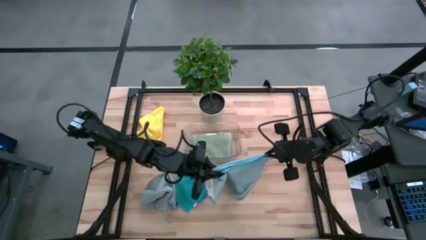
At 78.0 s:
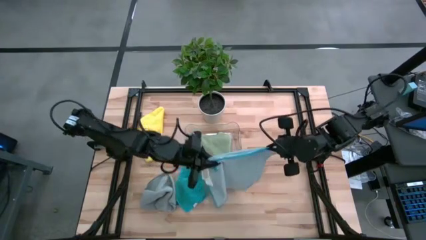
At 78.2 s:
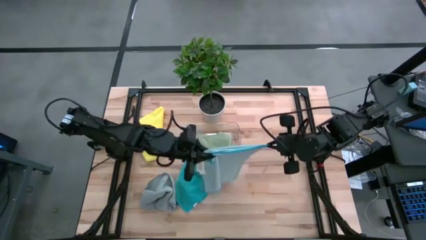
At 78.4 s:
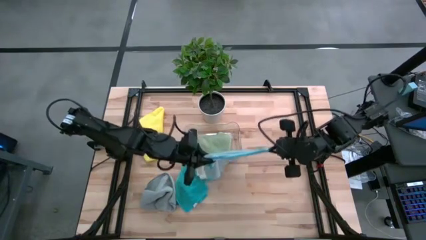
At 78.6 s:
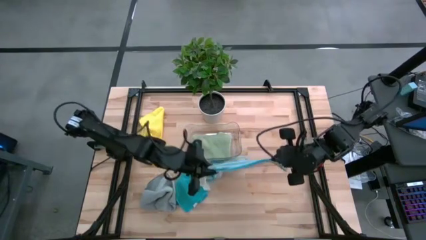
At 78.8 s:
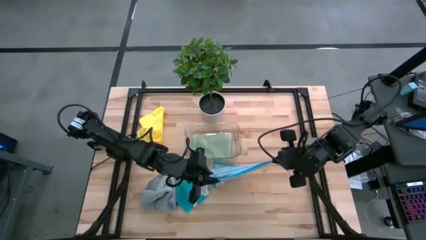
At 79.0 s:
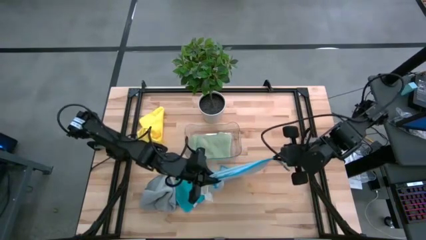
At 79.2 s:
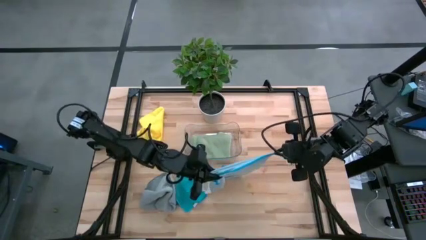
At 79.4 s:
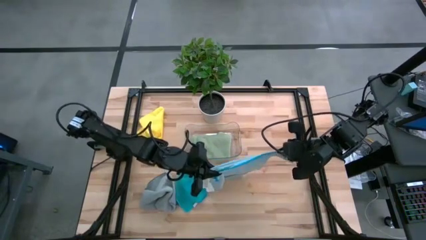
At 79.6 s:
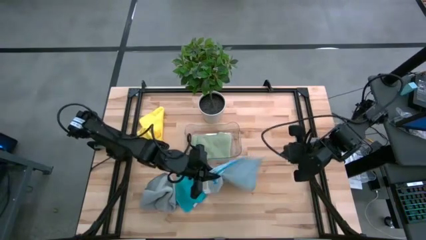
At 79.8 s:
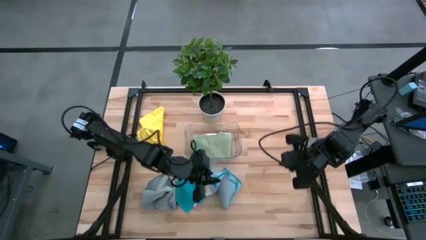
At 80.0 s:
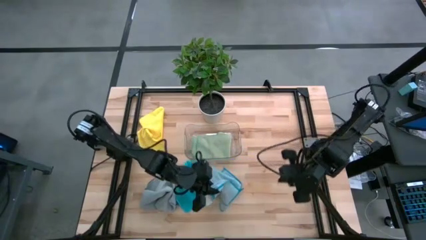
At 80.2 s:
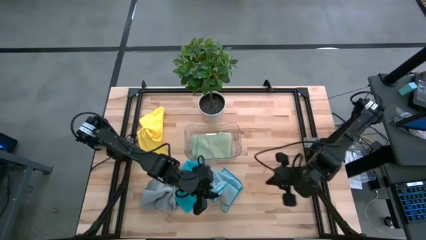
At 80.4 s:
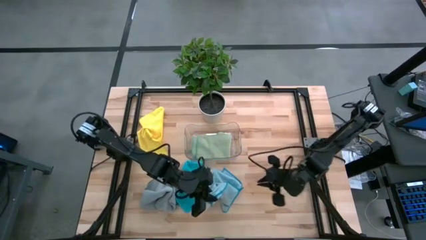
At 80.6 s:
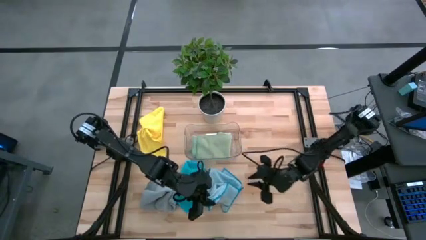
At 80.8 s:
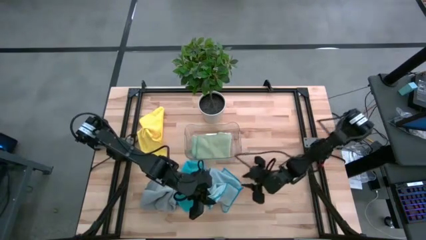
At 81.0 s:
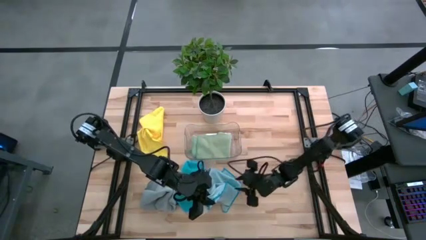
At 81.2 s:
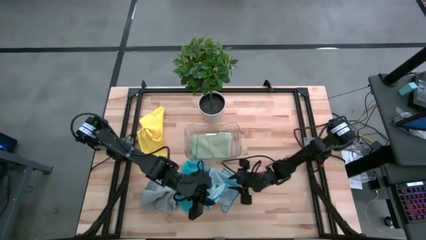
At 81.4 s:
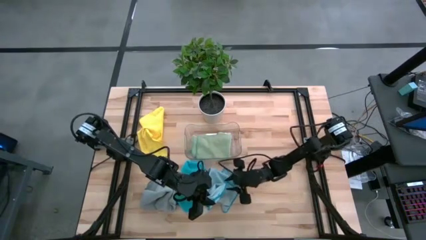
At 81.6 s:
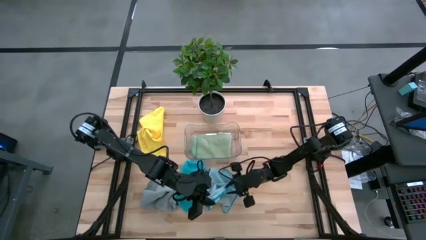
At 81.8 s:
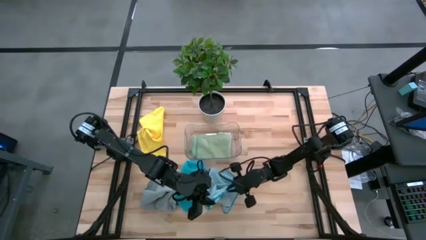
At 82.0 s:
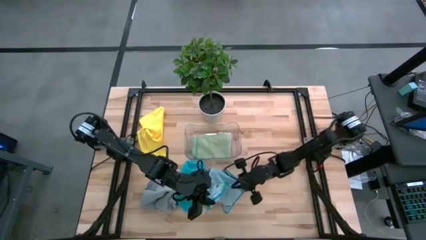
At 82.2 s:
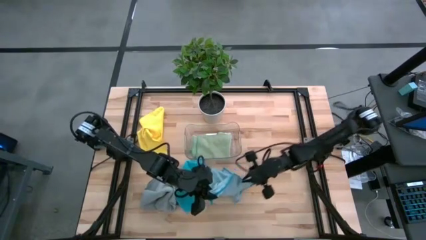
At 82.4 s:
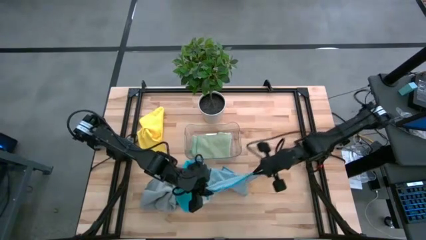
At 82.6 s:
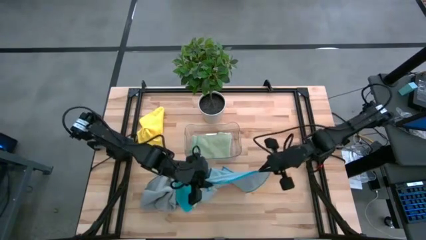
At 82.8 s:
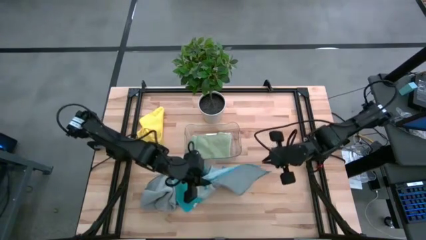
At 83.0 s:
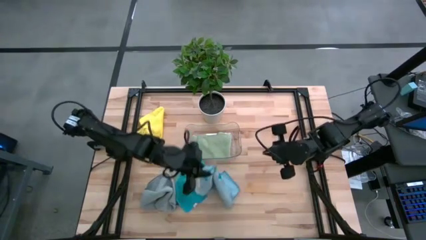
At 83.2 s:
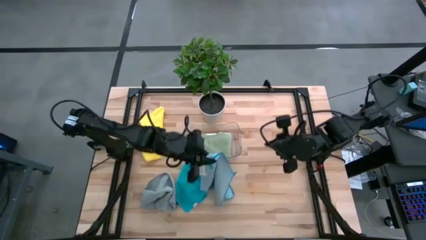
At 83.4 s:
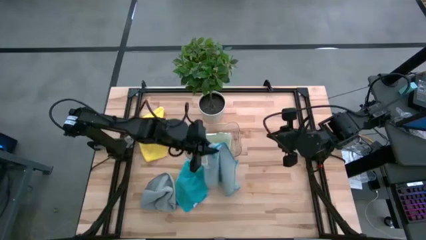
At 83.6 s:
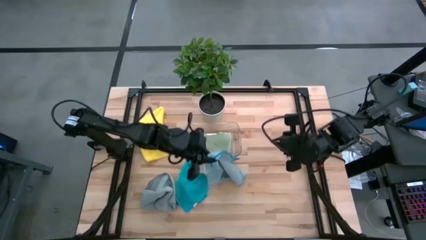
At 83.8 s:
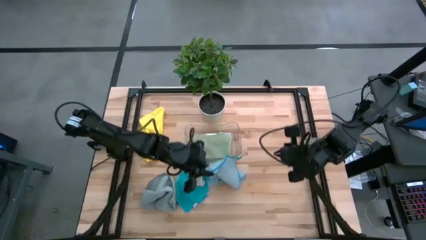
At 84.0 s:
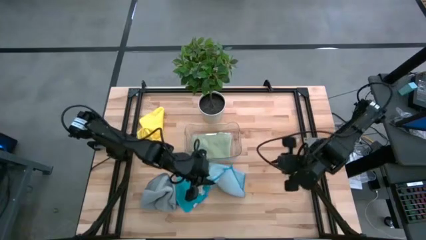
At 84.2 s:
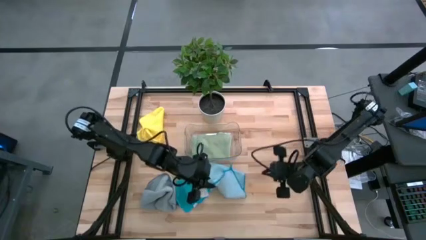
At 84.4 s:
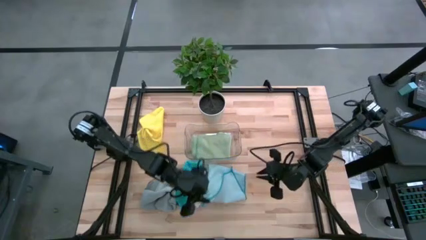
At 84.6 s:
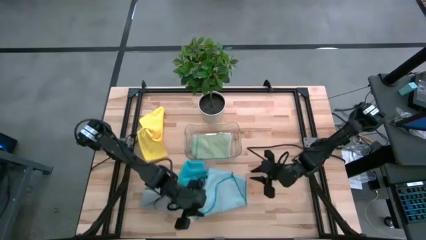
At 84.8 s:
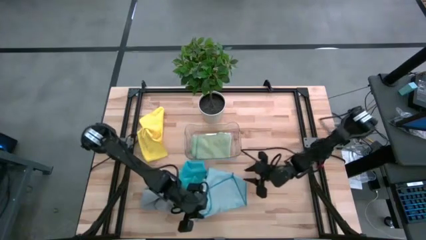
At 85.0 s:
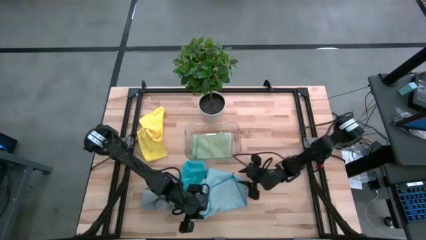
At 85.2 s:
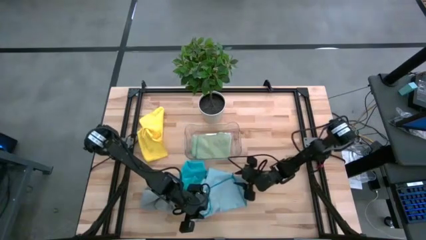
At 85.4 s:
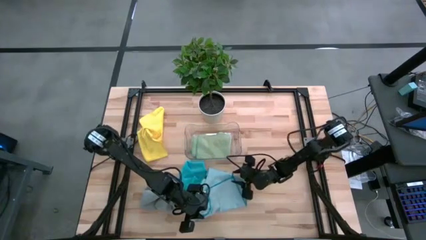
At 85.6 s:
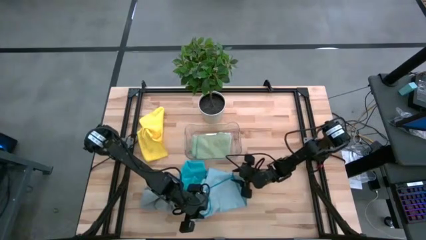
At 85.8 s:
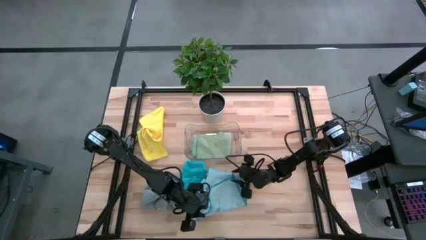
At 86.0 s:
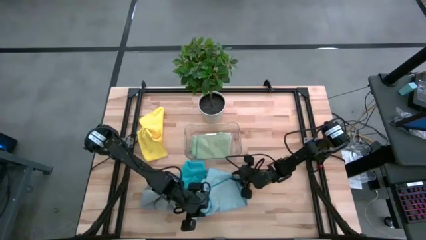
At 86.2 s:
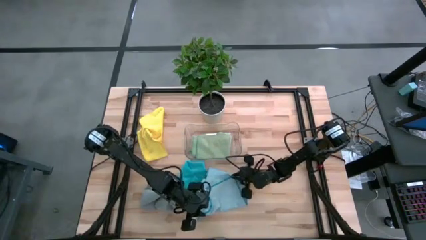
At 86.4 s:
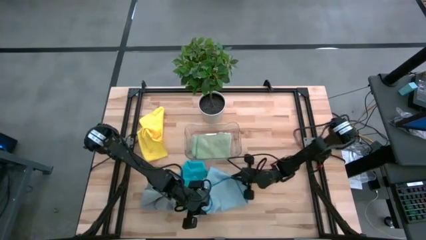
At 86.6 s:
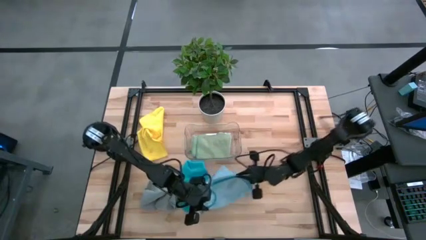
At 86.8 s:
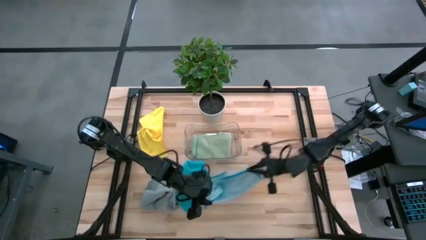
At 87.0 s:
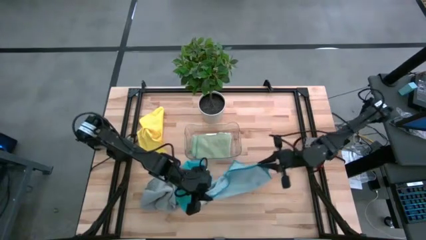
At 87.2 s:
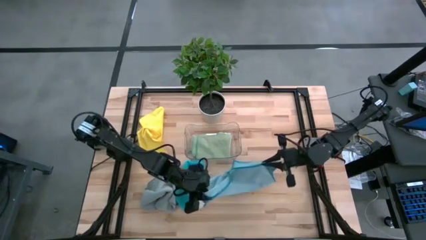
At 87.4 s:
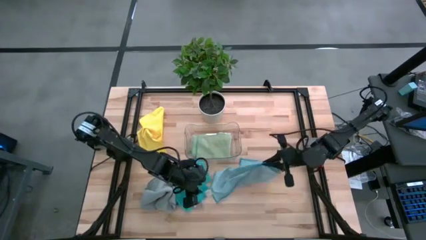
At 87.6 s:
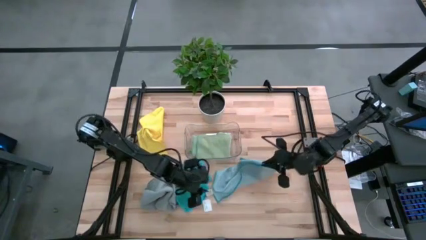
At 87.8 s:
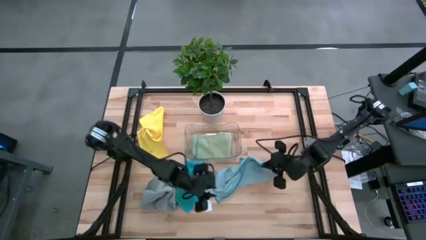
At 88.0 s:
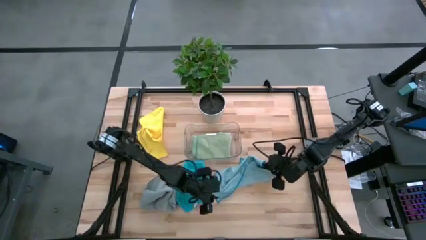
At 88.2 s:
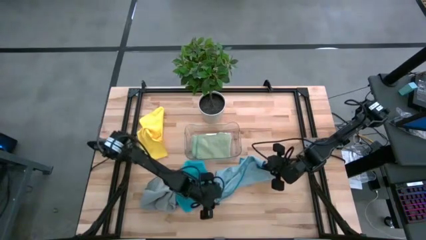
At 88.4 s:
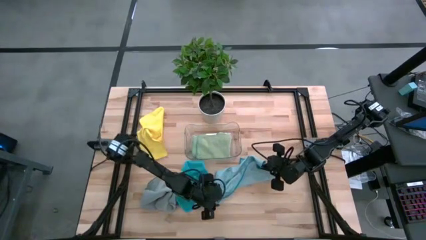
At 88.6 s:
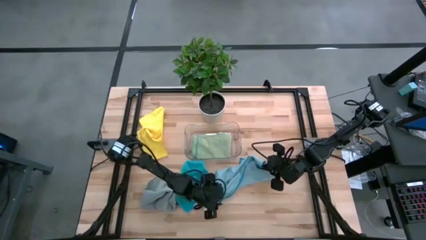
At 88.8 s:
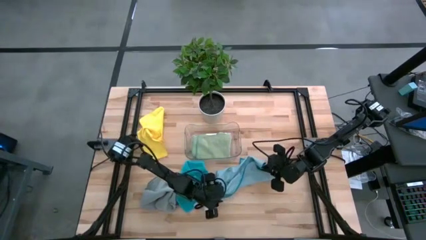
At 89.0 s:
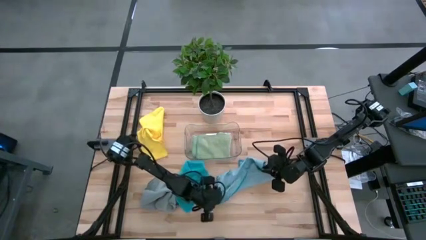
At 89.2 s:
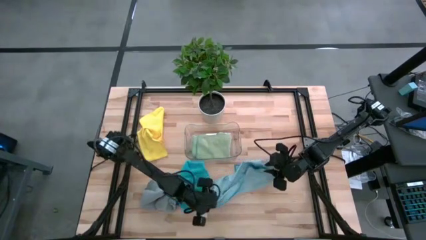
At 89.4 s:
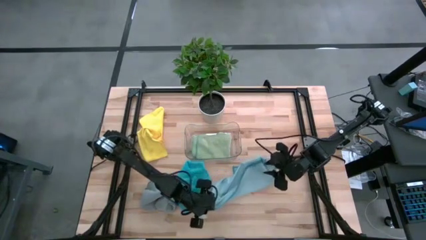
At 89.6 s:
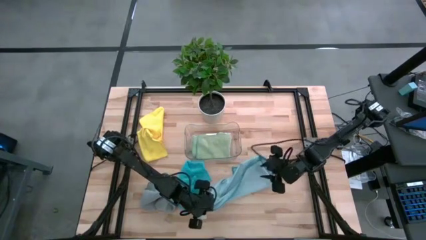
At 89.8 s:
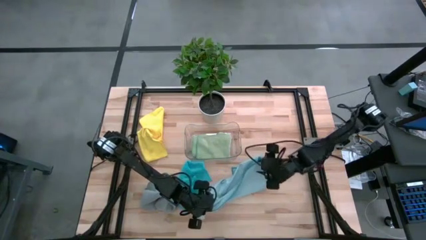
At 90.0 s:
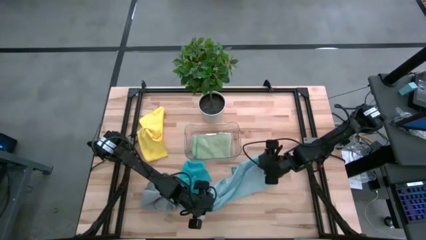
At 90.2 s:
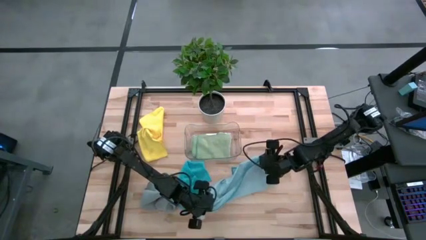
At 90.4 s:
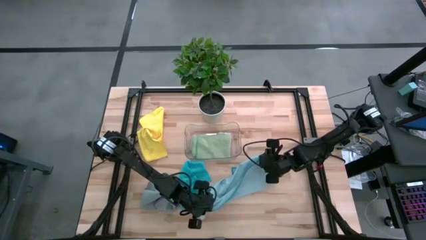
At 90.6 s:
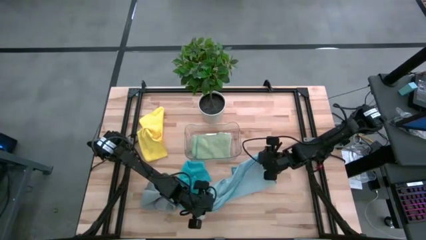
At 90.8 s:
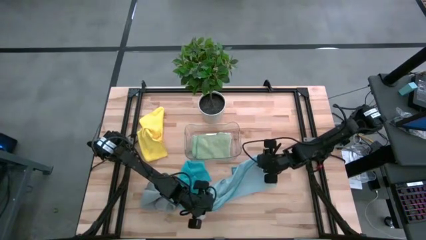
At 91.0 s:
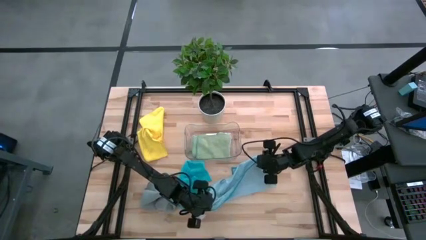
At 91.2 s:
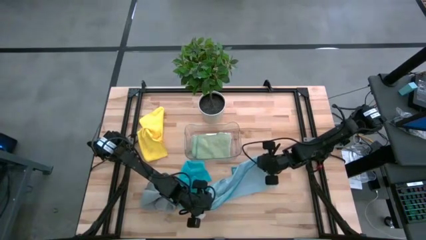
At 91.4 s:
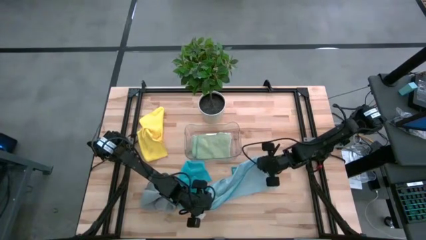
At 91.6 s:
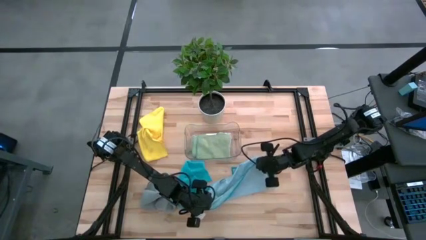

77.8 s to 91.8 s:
Task: Fold microfiber towels
Fold the light blue microfiber cloth
